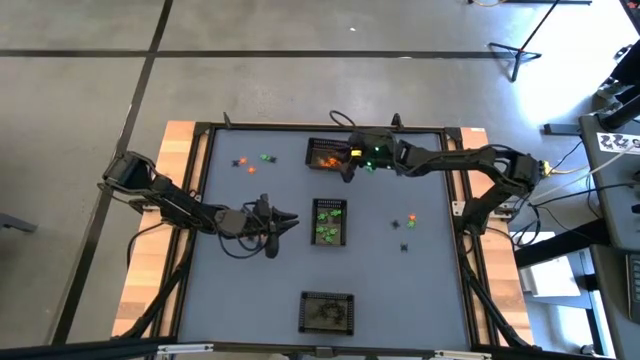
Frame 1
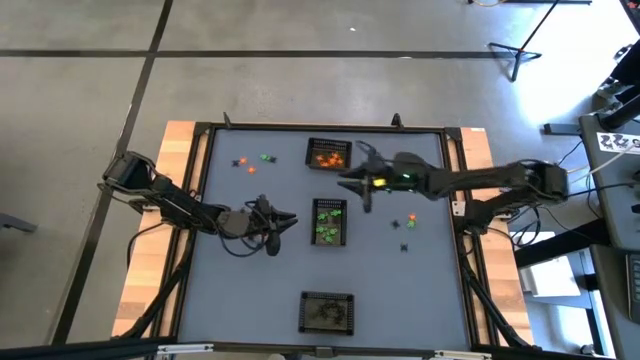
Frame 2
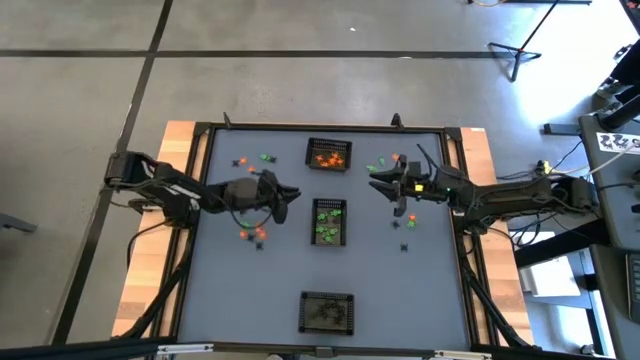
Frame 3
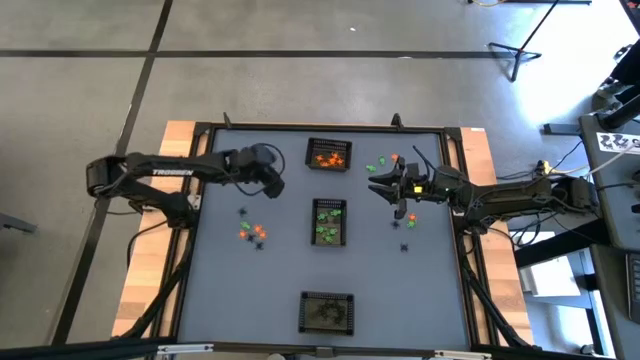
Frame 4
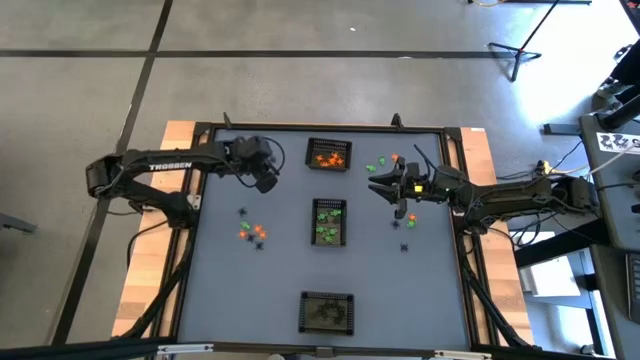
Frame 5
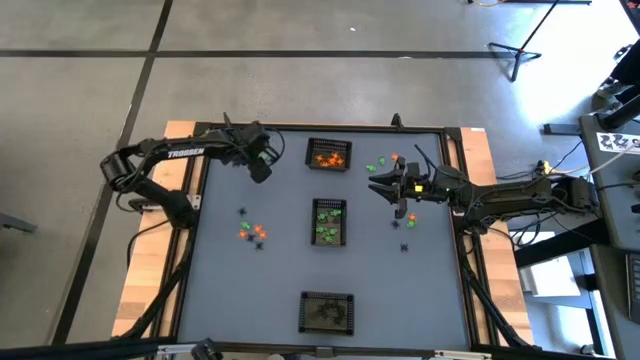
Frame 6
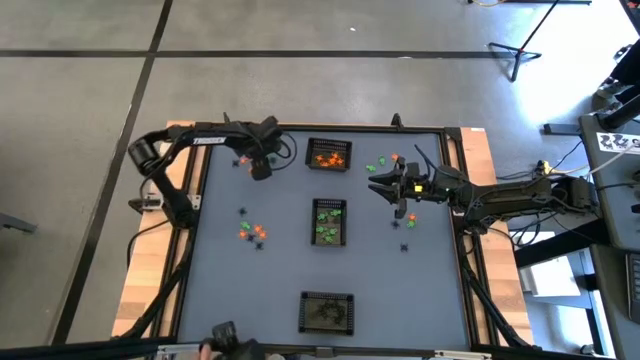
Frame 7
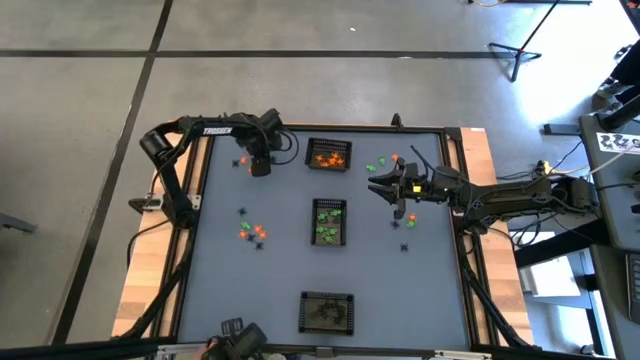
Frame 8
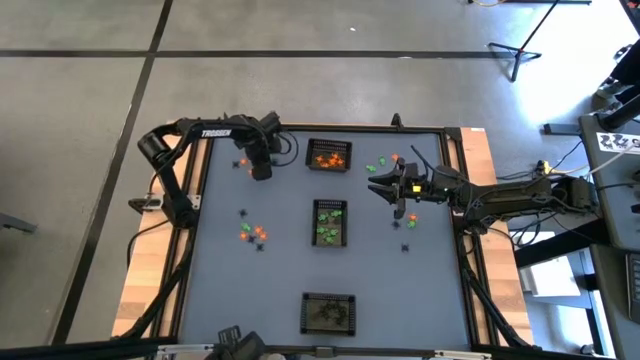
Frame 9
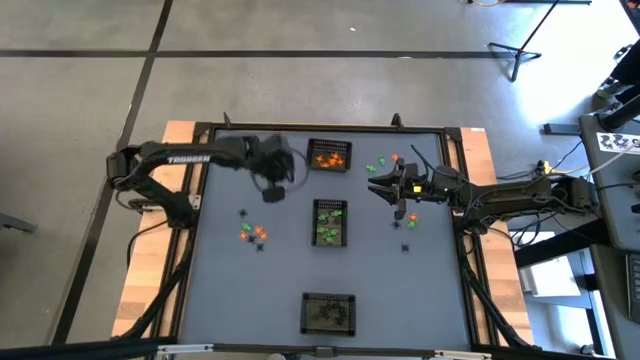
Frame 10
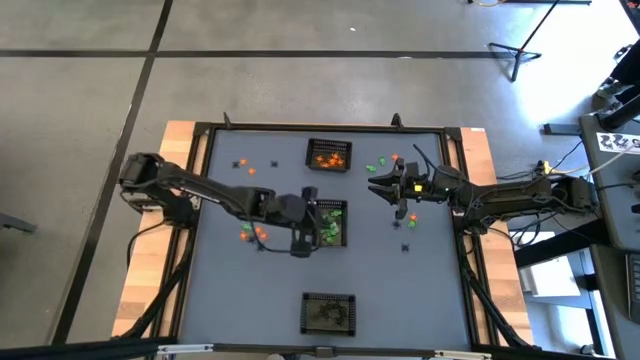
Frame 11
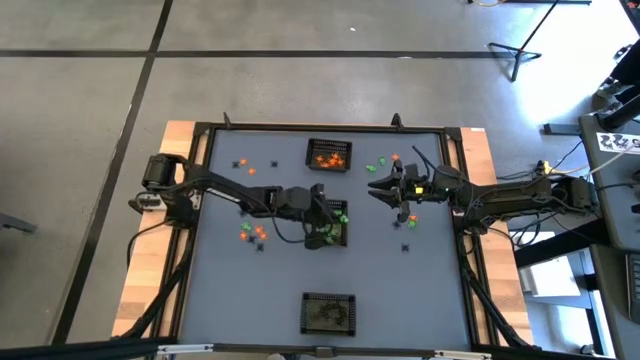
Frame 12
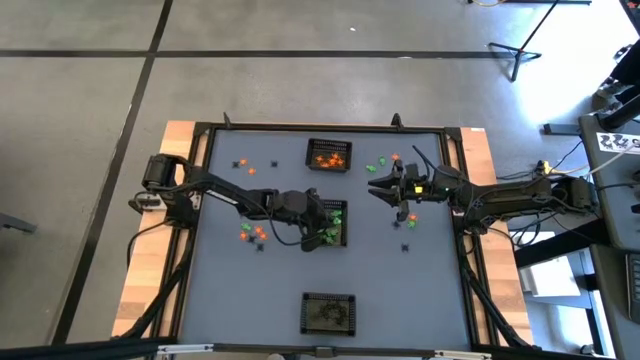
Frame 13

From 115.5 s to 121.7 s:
Task: Sort Halloween decoration
Put the green skeleton toy into the center black bin

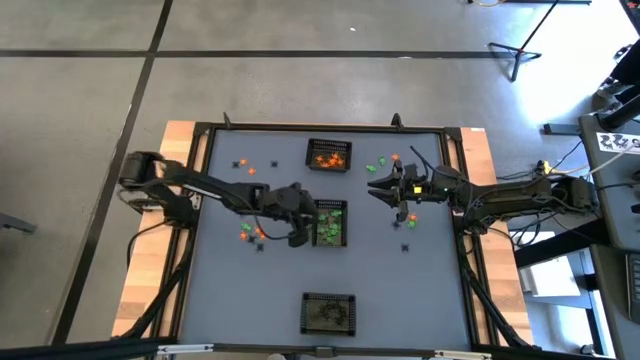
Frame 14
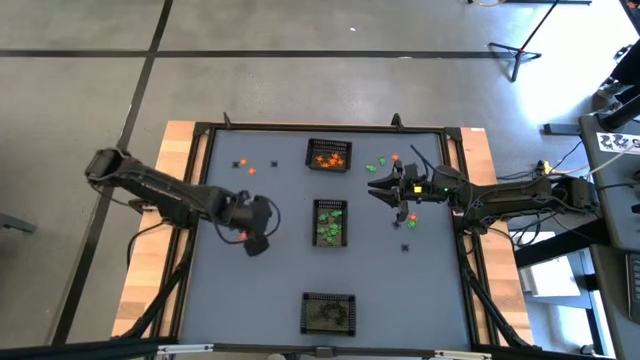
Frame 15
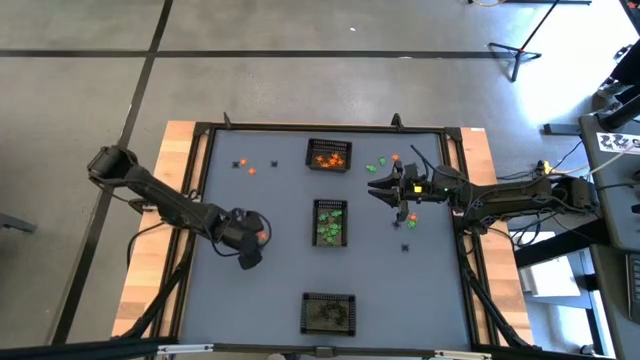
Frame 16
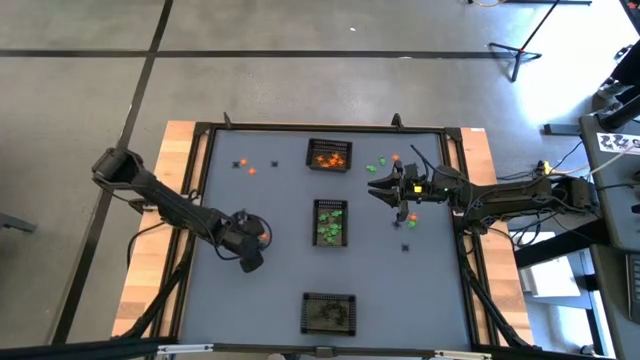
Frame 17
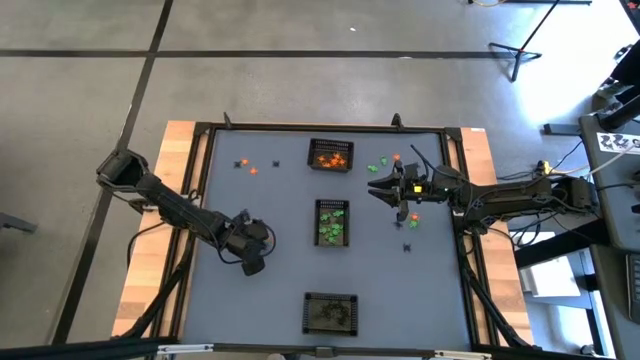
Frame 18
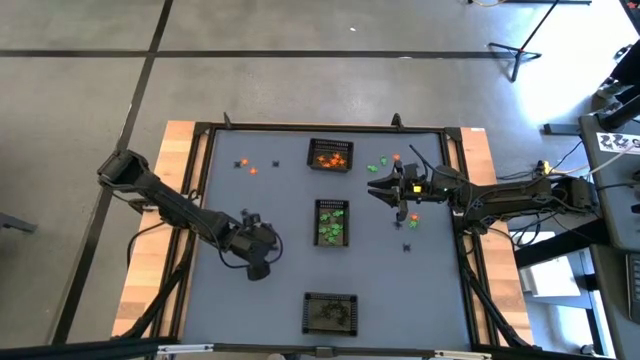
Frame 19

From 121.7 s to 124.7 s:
Put the black spider toy into the bottom black bin

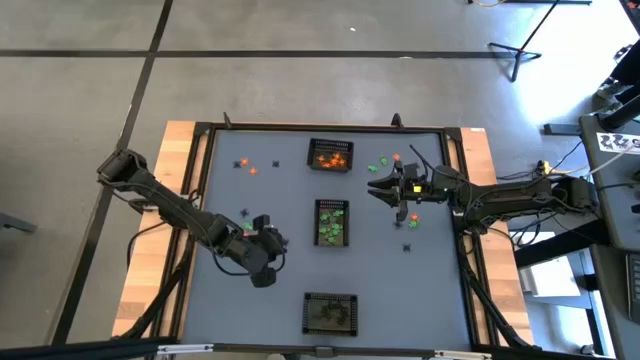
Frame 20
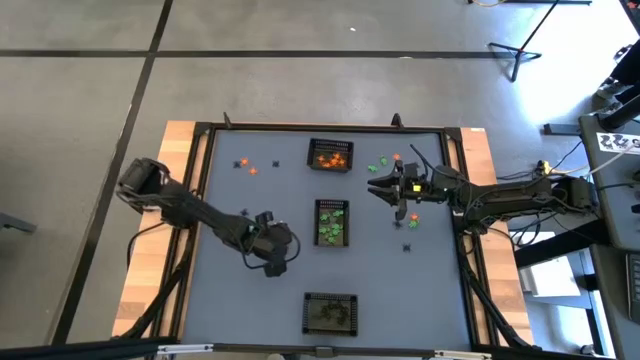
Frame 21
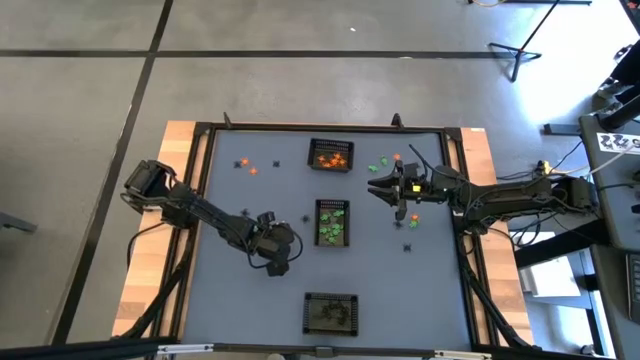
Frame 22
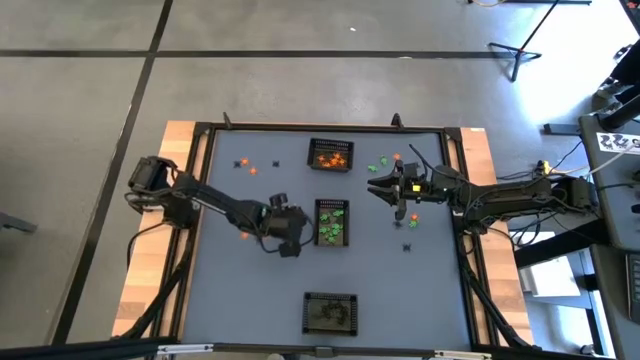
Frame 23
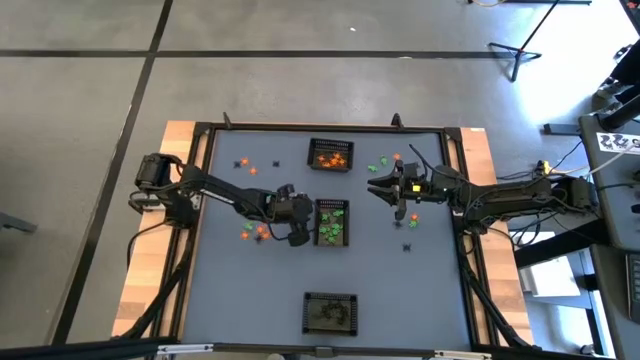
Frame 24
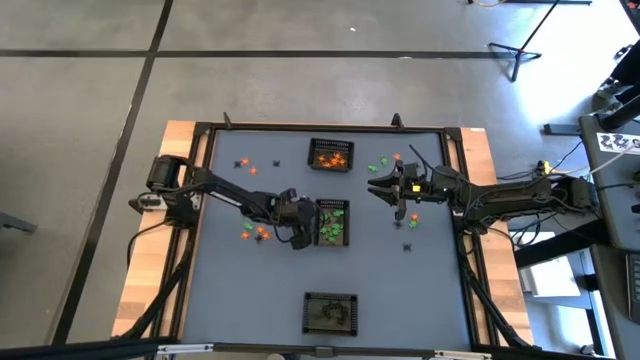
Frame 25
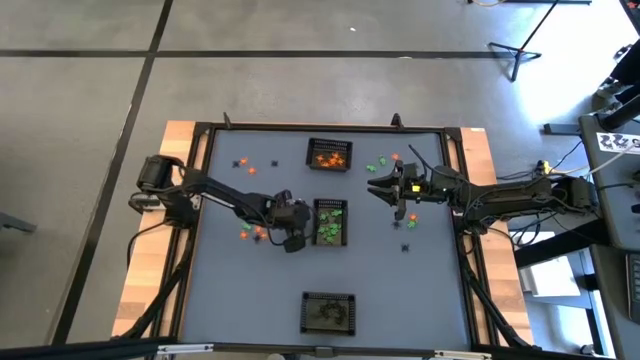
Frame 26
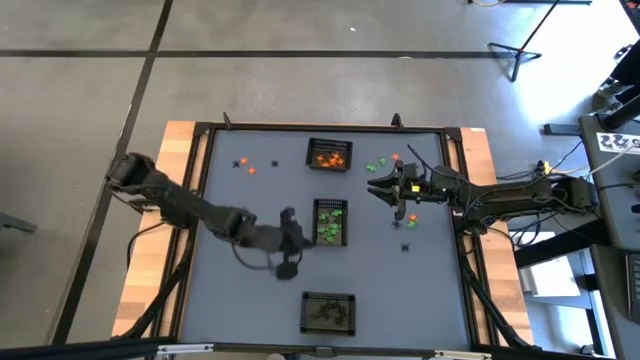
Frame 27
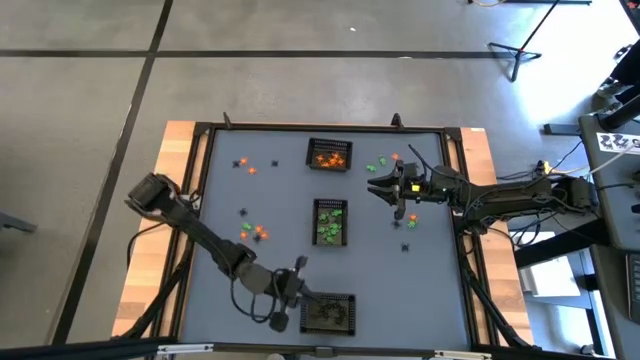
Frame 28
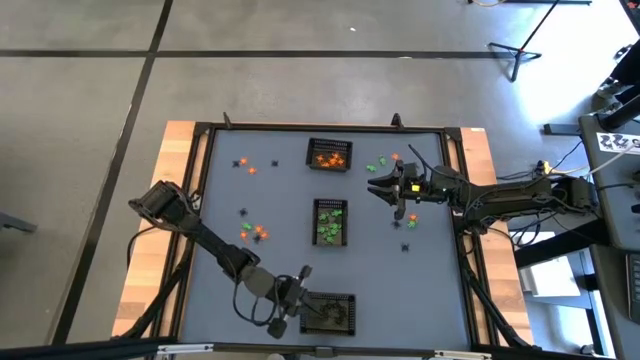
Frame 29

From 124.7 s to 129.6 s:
Put the black spider toy into the bottom black bin

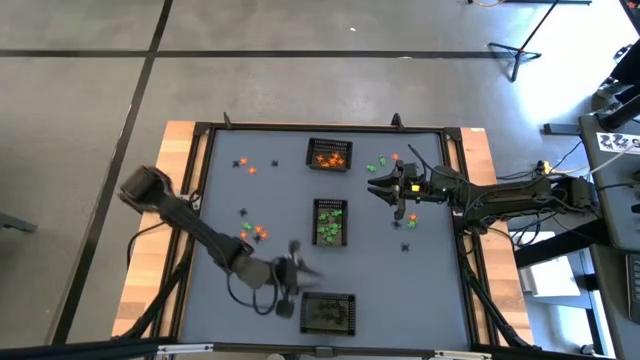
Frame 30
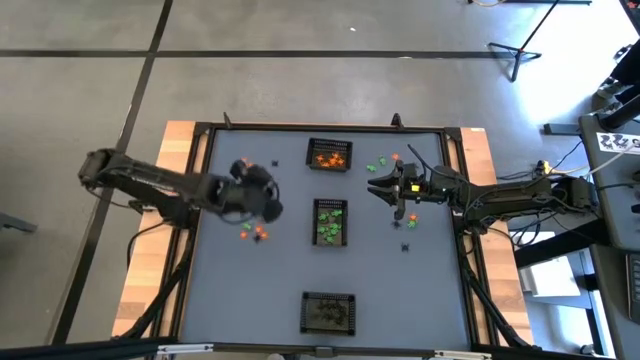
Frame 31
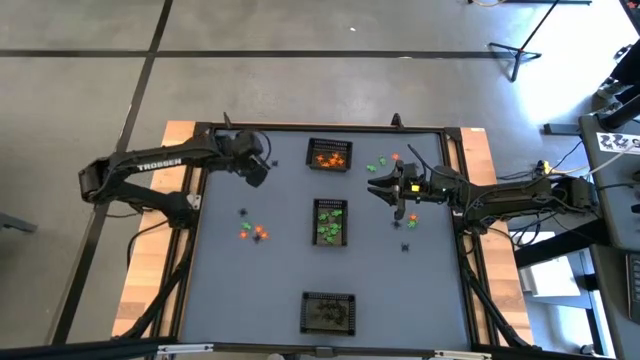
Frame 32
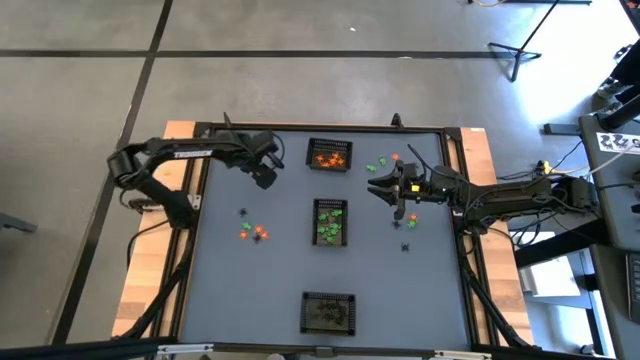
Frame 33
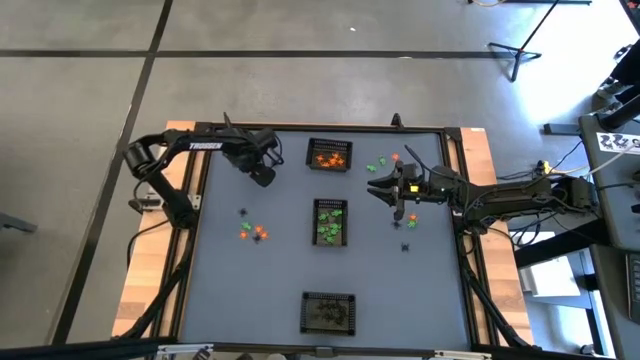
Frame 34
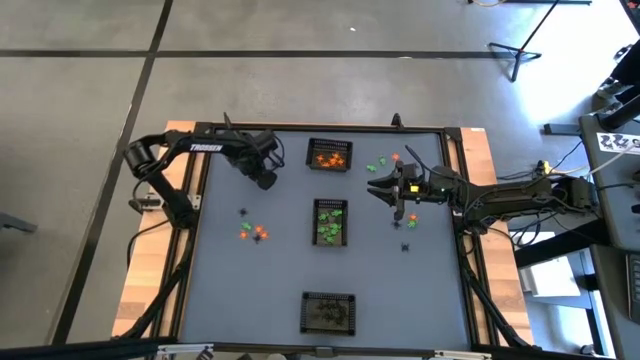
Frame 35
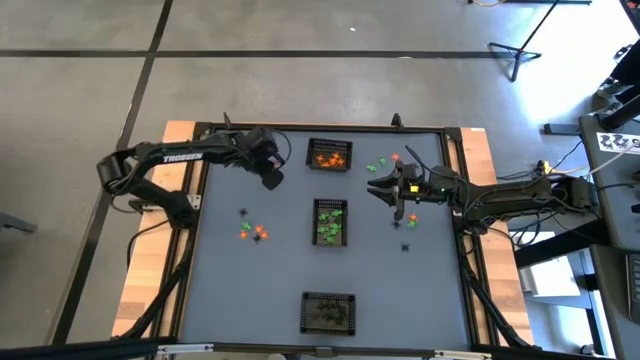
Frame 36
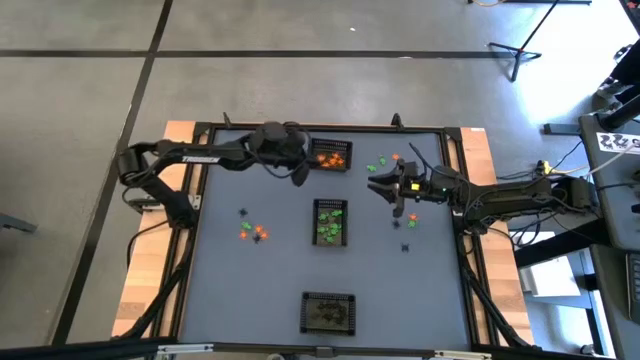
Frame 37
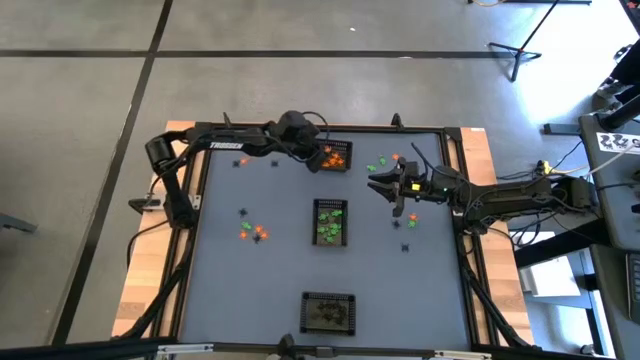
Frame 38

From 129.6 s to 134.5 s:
Put the orange spider toy into the top black bin

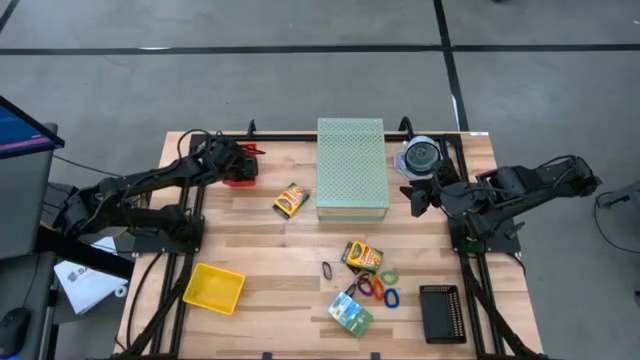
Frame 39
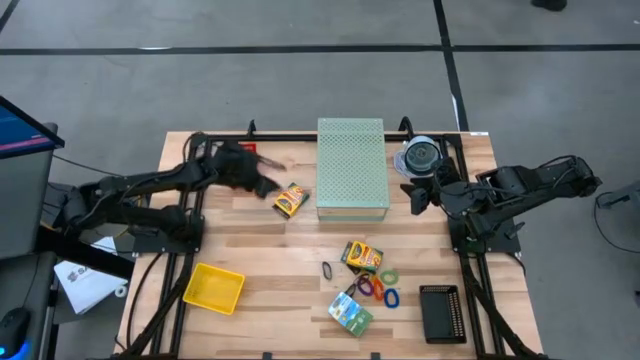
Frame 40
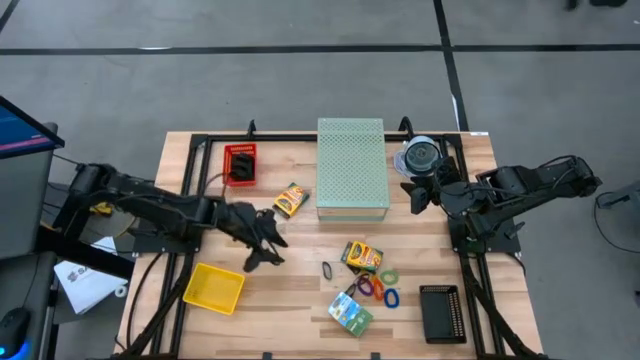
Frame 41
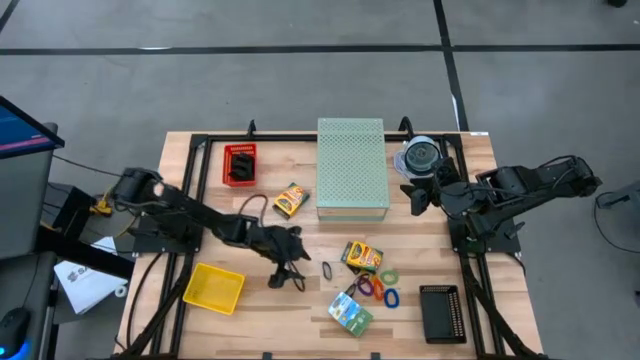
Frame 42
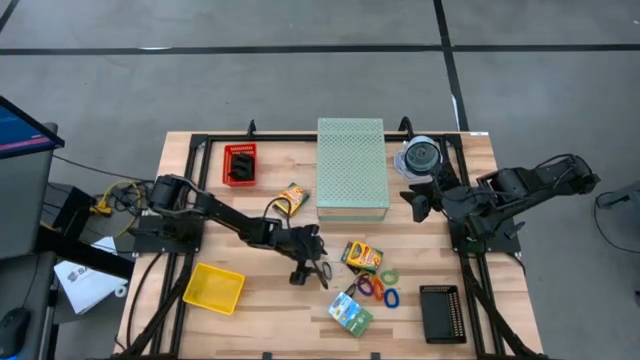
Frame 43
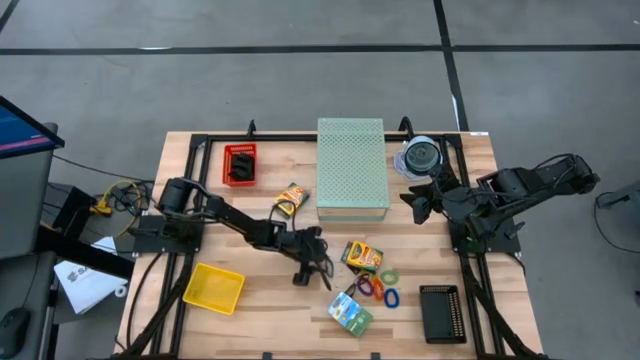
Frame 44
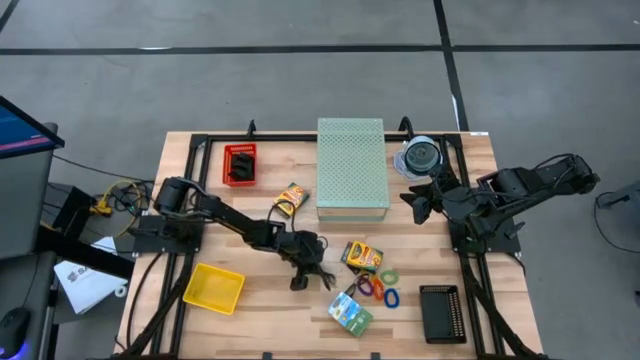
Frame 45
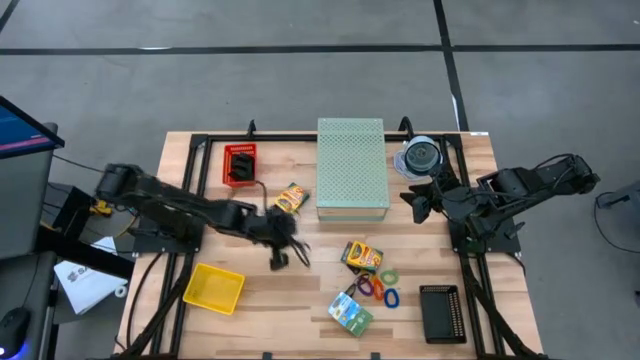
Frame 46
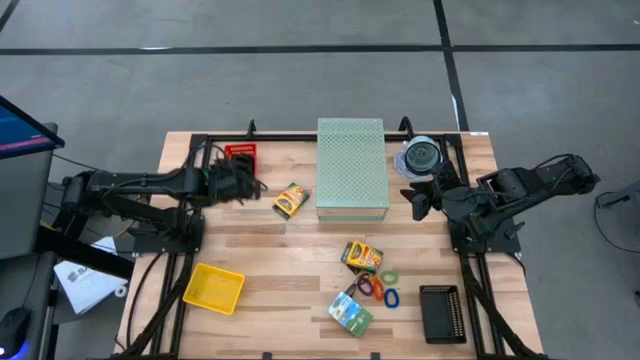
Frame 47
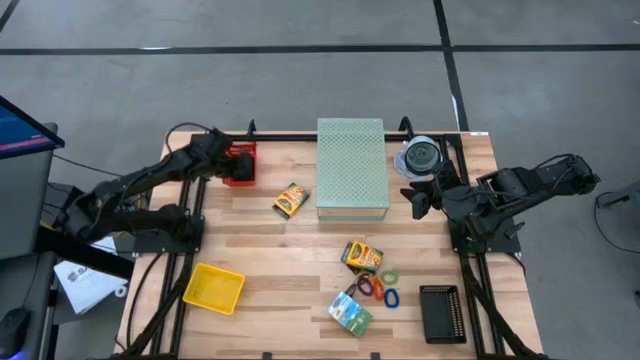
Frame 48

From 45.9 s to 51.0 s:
Task: Pick & Place Office Desk Supplies
Put the black rubber band into the red bin
